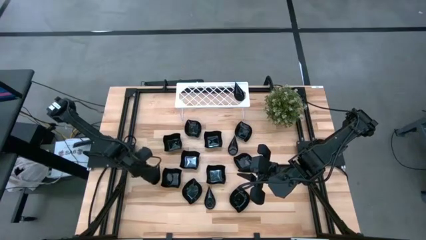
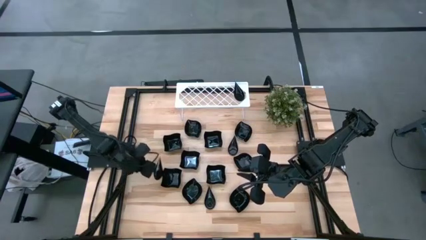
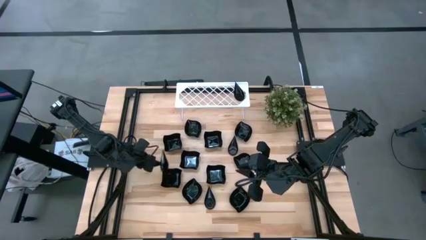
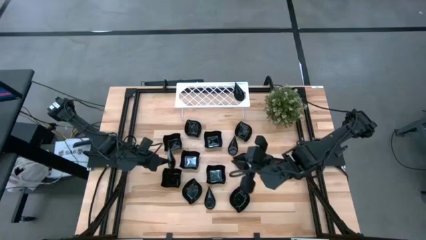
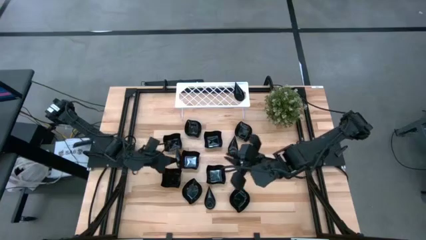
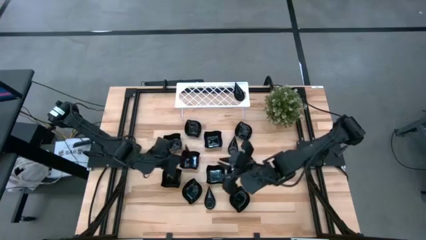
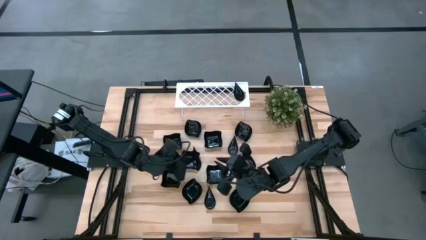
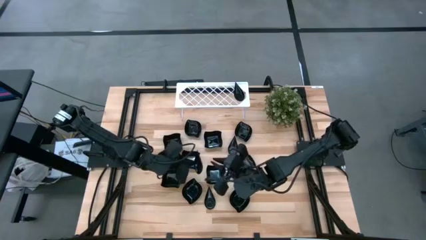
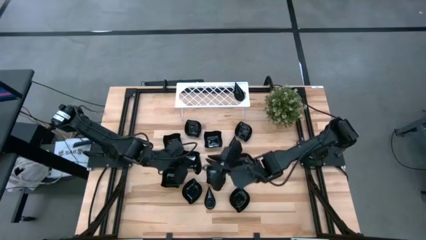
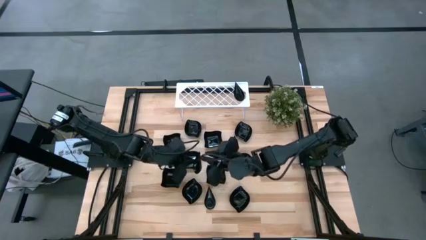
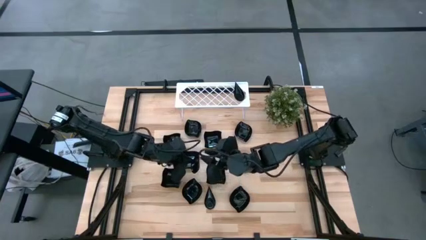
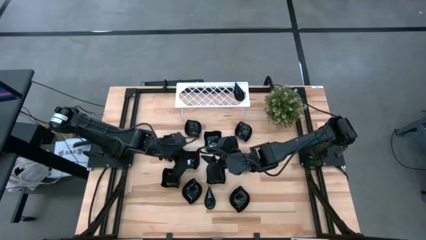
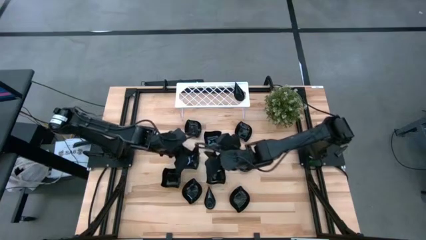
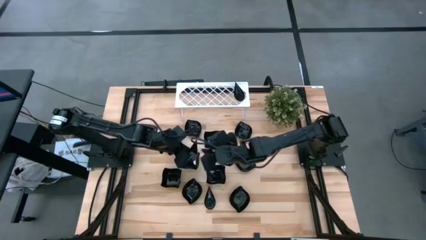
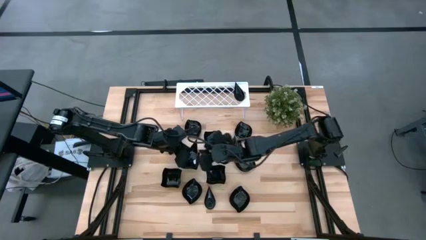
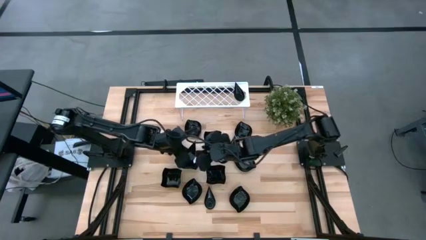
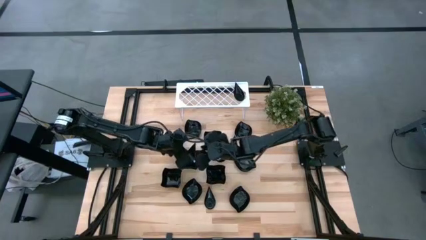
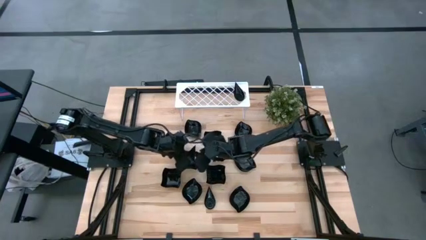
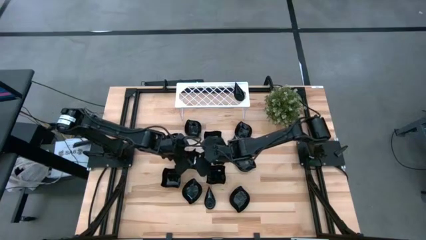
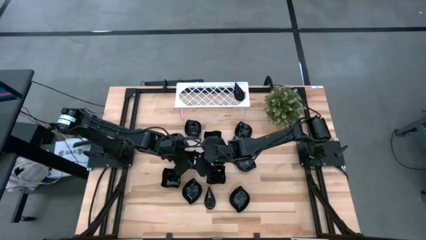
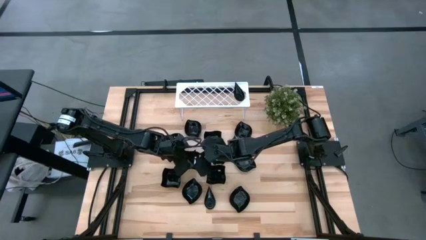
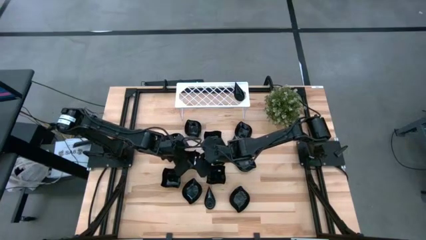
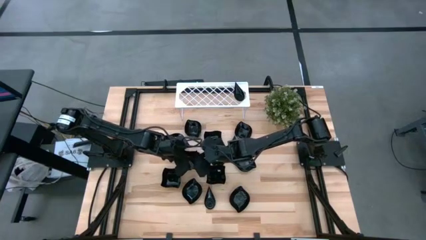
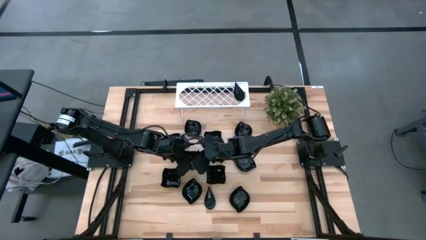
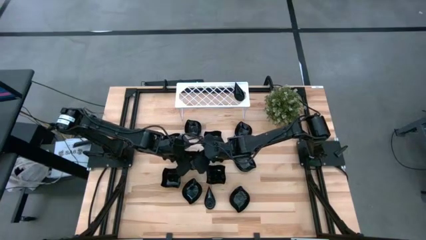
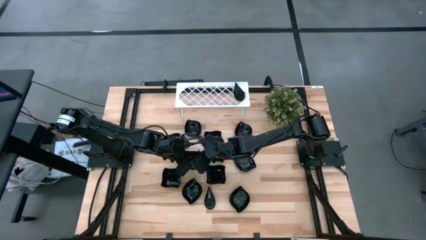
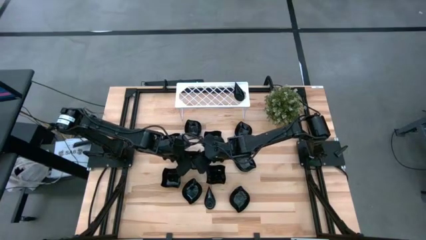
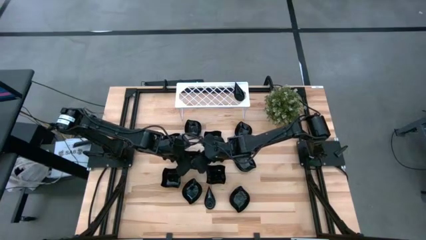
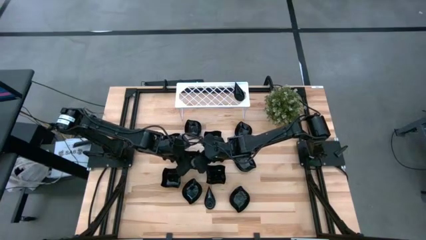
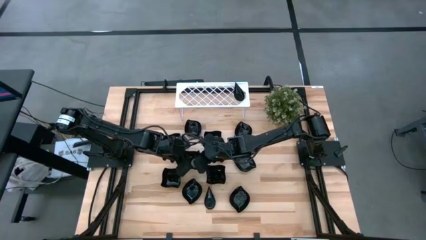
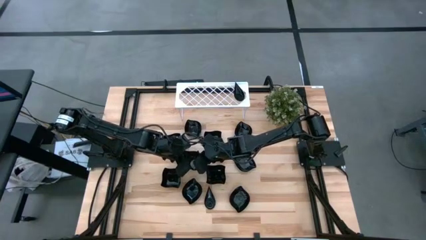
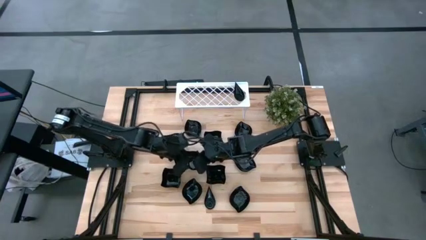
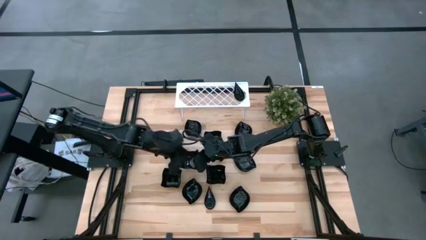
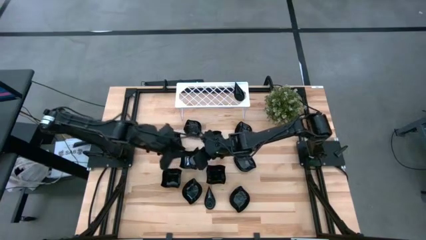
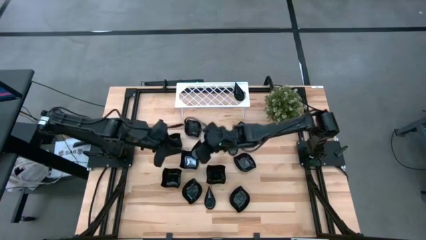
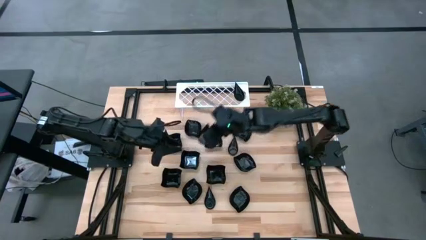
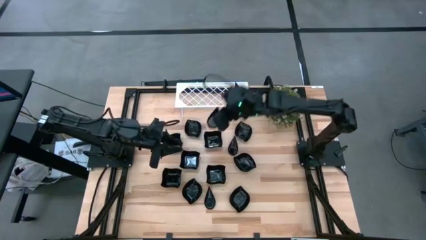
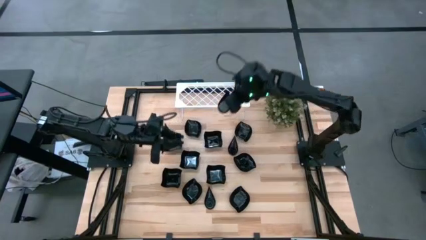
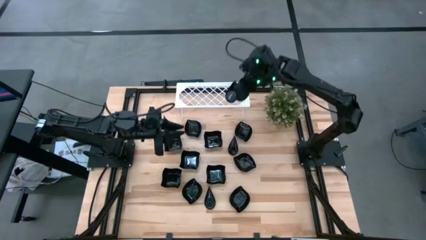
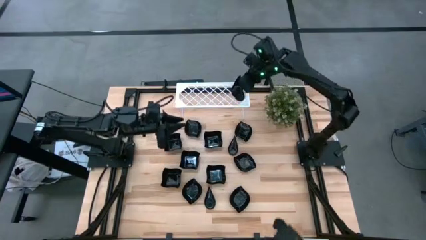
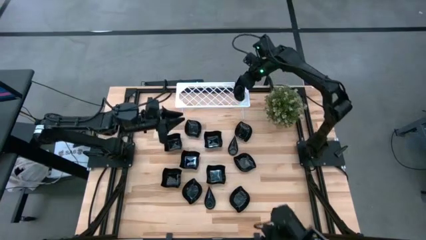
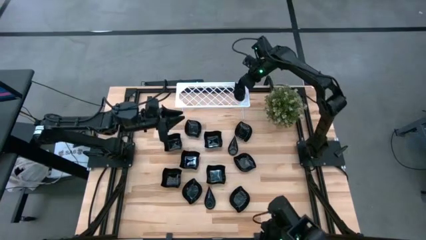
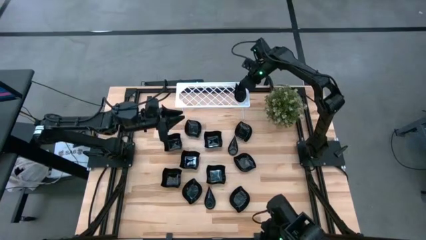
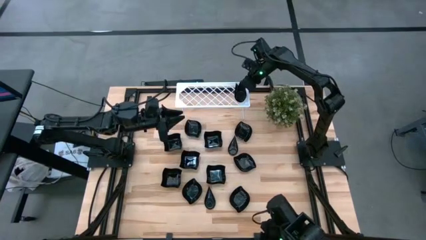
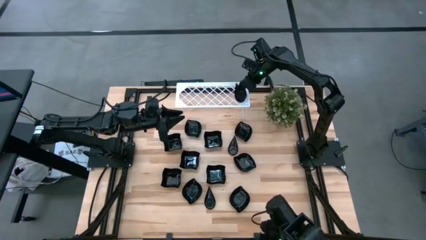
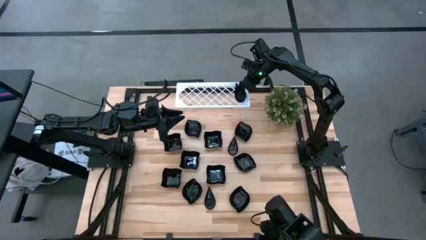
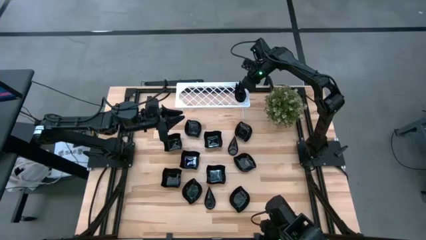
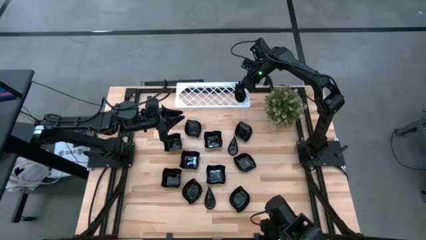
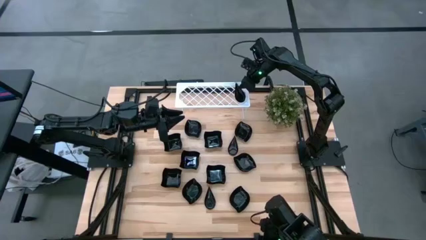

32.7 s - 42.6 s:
Task: Pick & Place Mini shaped plates
Stack the drop-shaped plate on top of the drop-shaped plate on the shelf

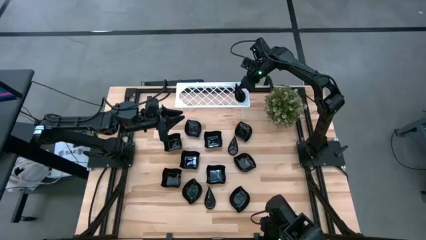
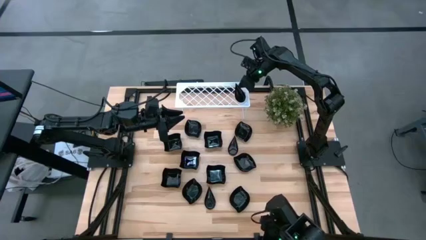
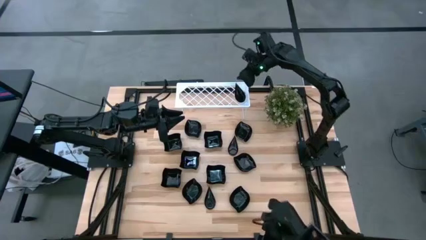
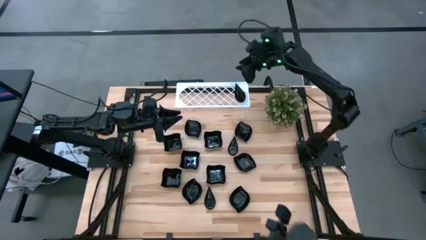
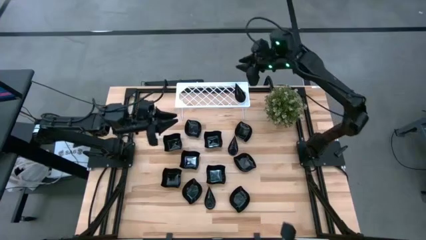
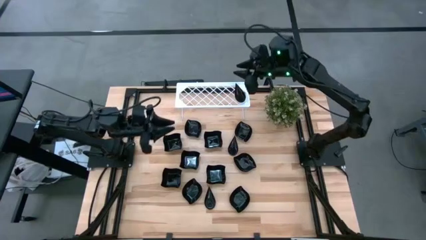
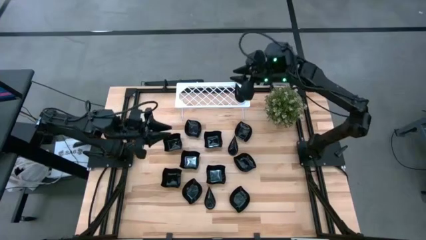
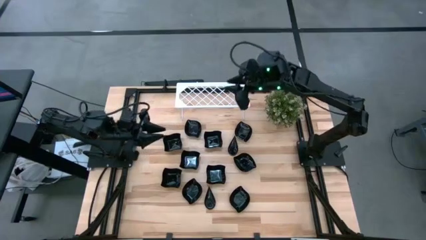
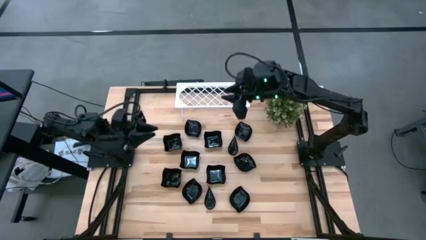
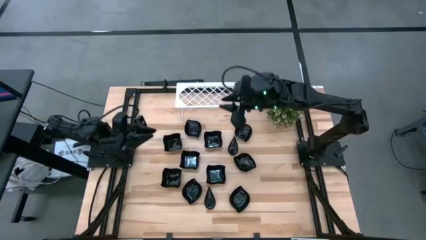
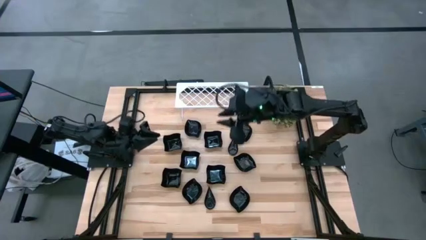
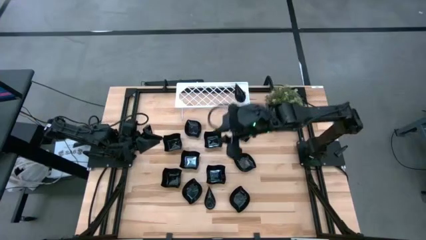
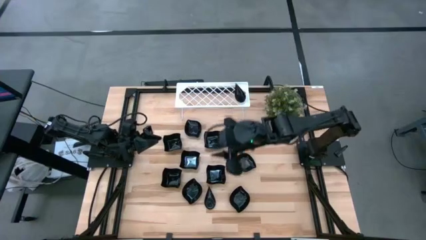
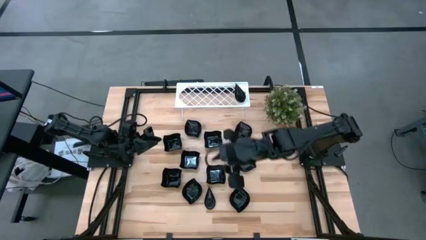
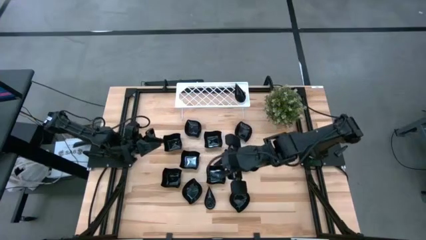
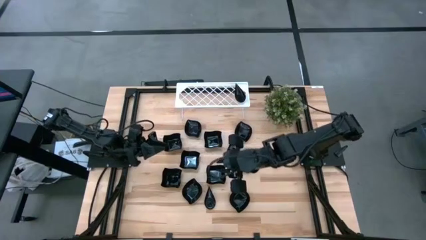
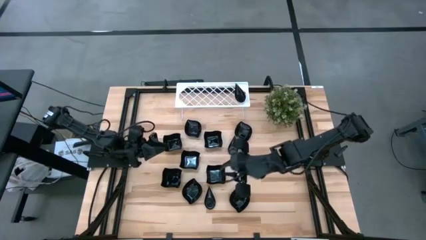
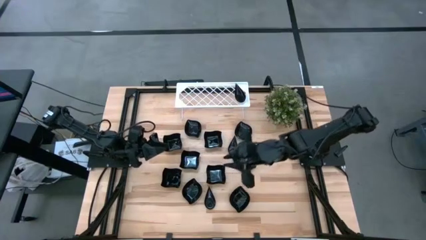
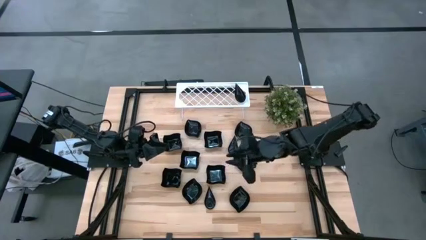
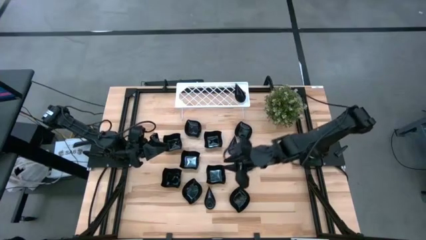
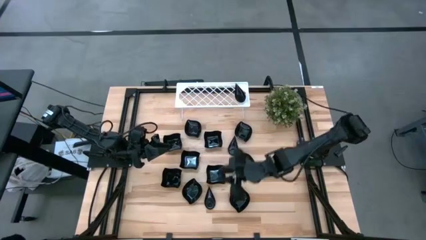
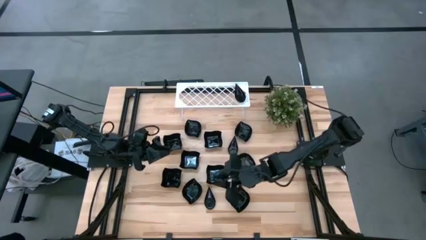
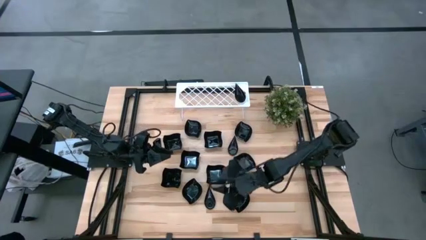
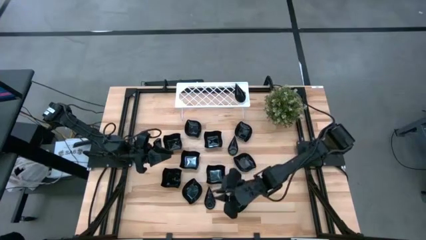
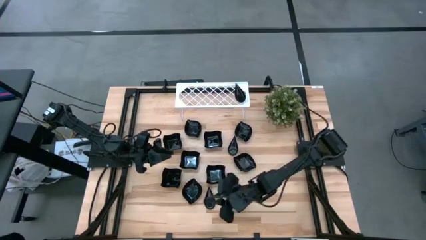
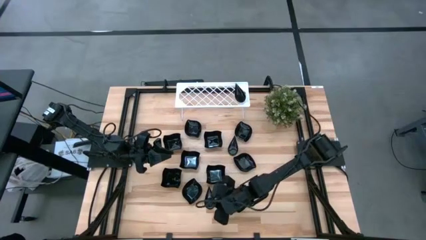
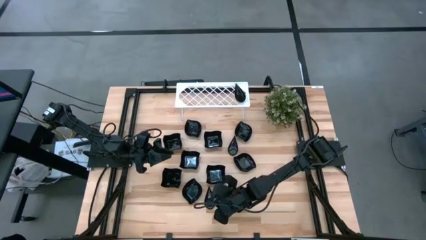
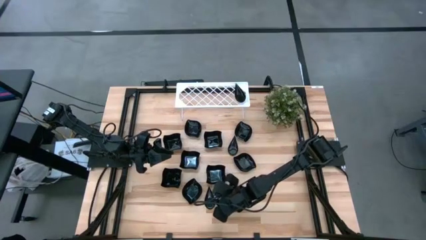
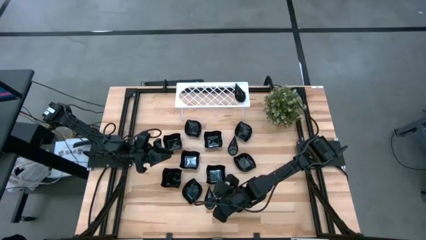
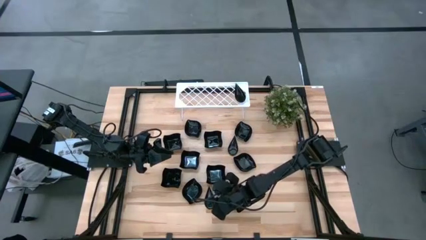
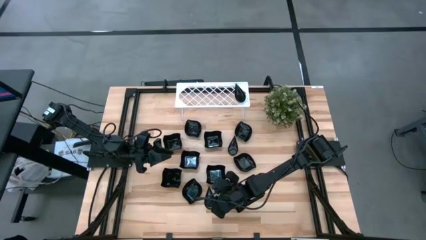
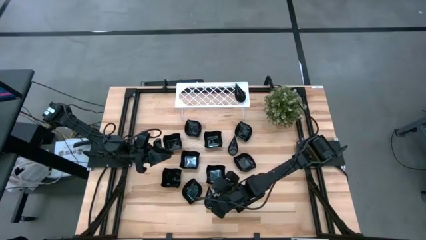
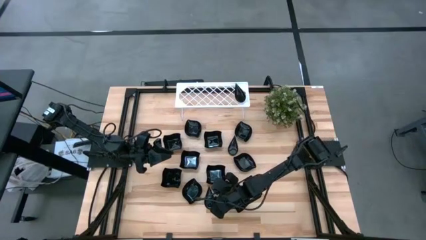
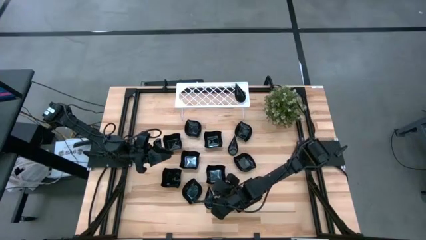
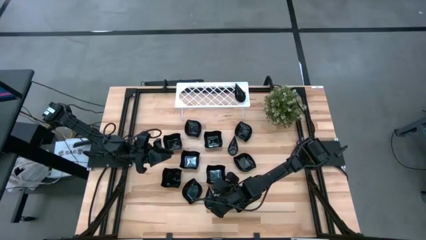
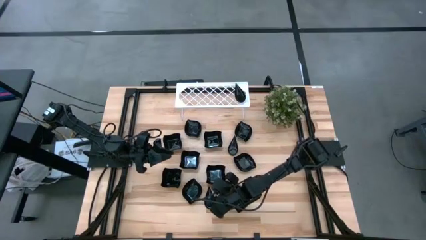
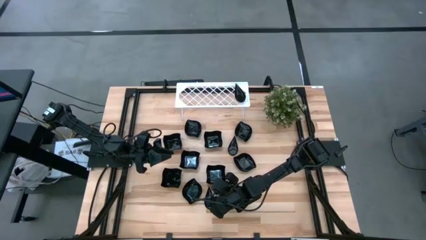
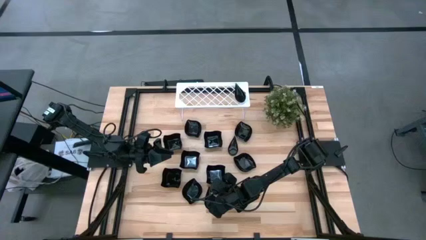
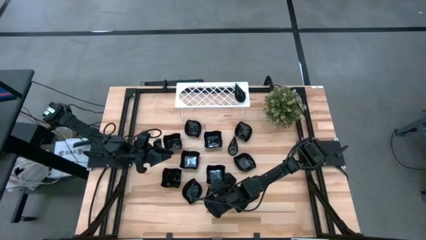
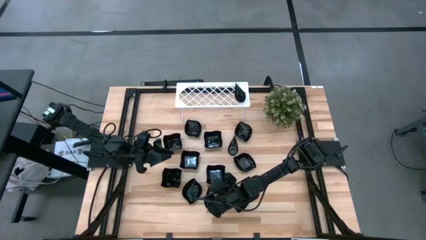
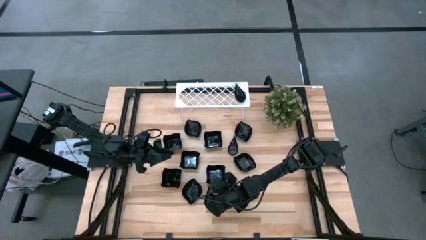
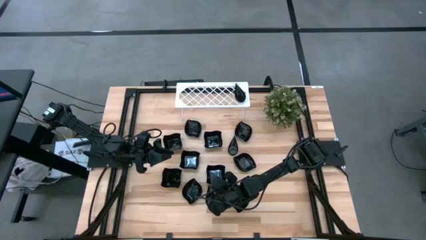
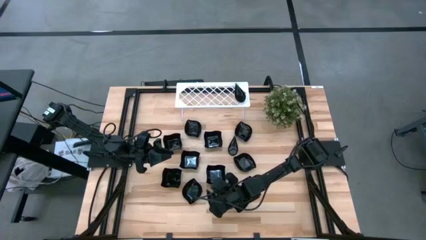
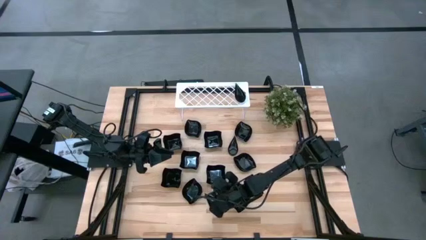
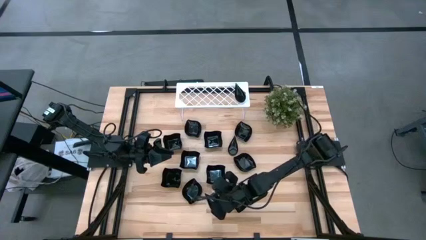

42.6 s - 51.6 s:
Stack the drop-shaped plate on top of the drop-shaped plate on the shelf
